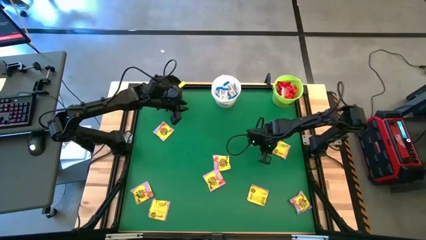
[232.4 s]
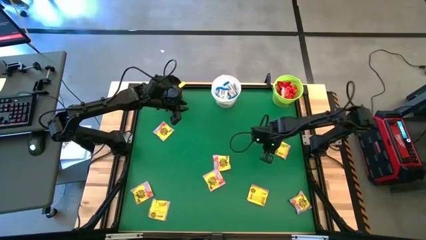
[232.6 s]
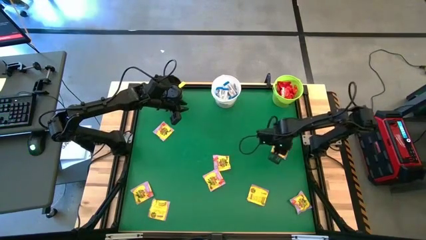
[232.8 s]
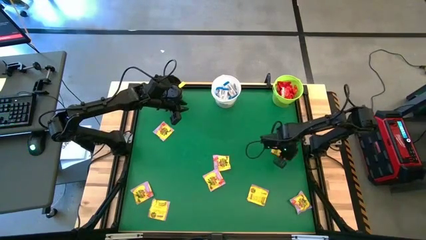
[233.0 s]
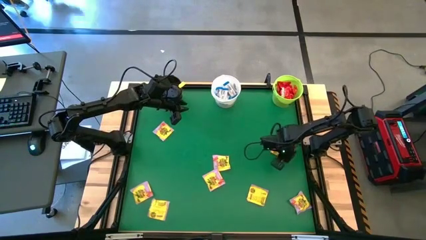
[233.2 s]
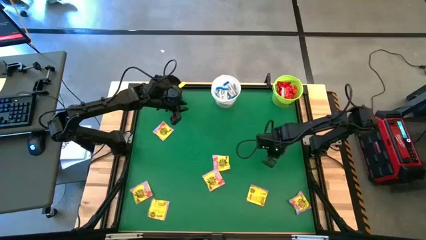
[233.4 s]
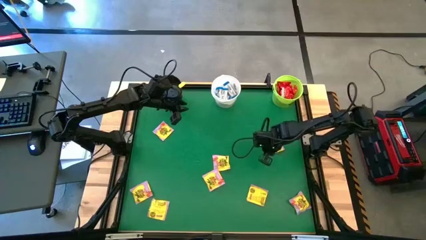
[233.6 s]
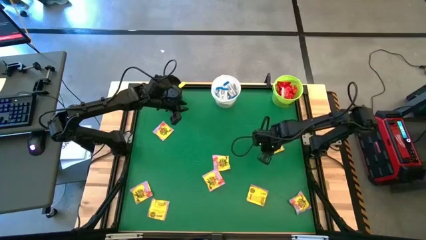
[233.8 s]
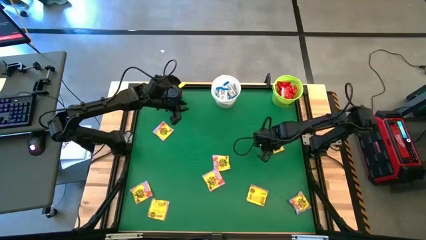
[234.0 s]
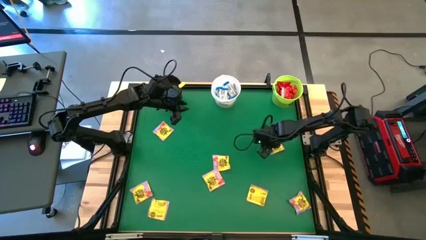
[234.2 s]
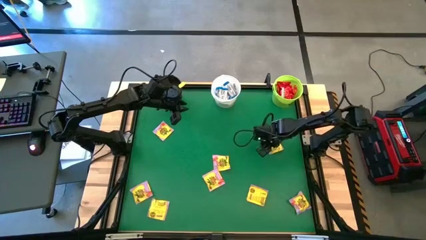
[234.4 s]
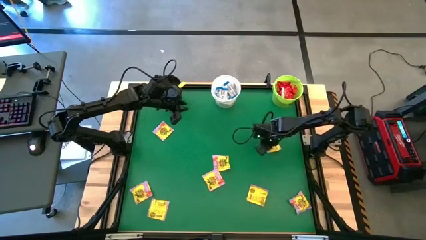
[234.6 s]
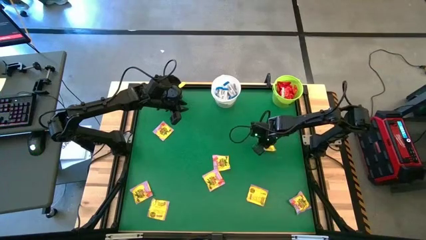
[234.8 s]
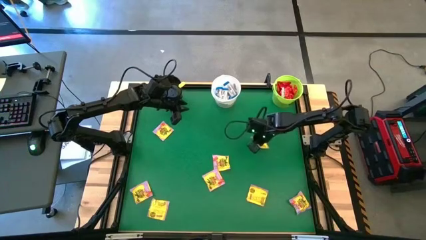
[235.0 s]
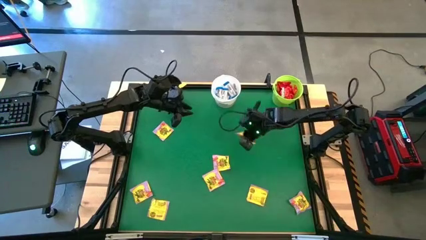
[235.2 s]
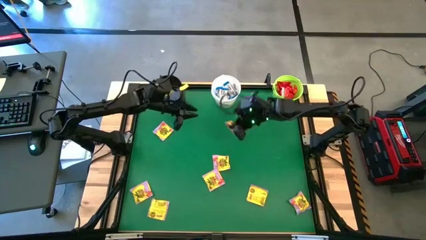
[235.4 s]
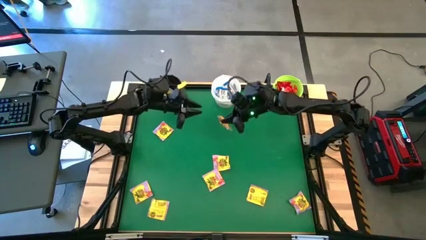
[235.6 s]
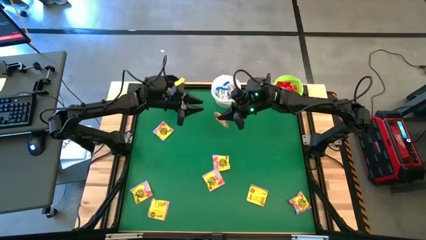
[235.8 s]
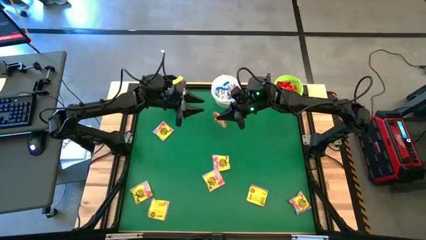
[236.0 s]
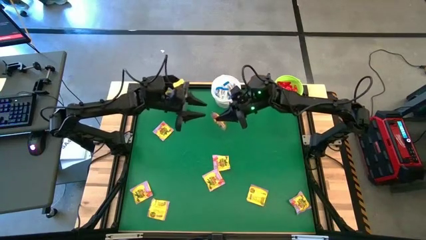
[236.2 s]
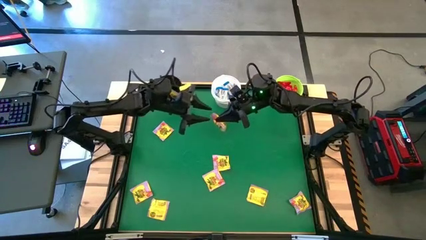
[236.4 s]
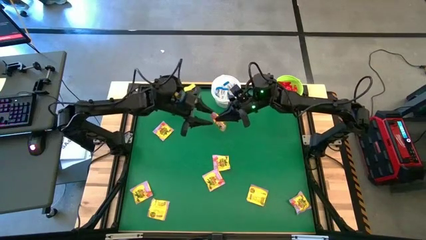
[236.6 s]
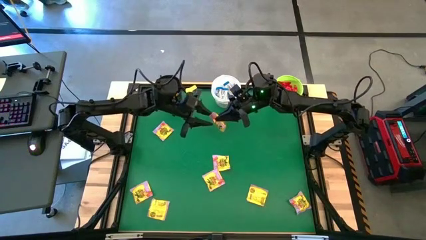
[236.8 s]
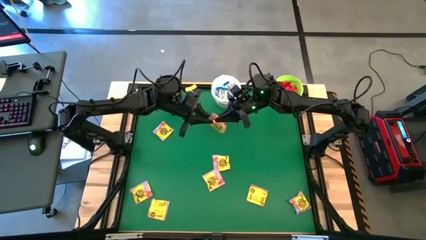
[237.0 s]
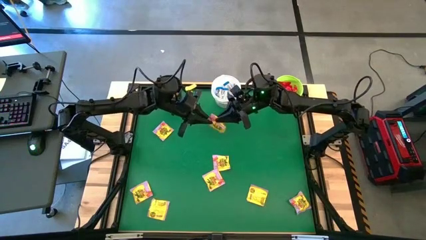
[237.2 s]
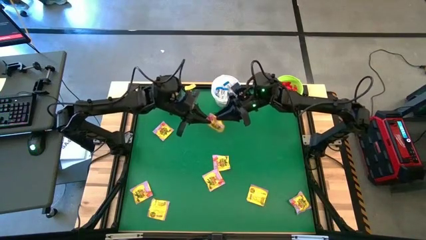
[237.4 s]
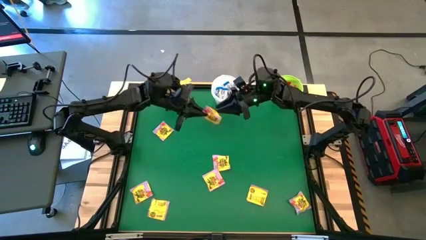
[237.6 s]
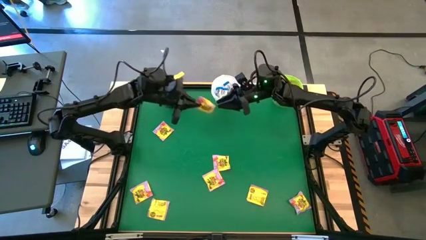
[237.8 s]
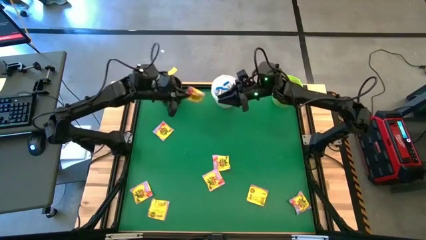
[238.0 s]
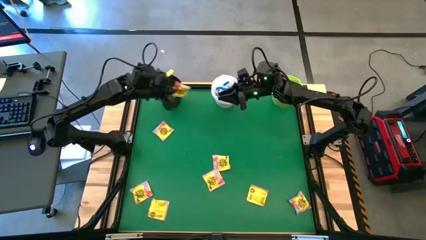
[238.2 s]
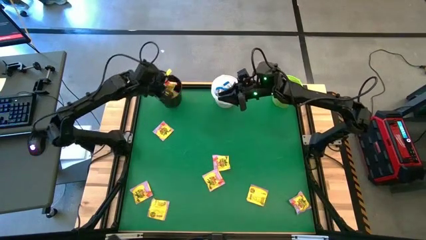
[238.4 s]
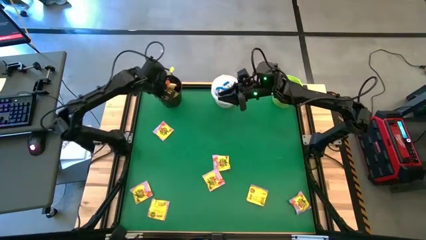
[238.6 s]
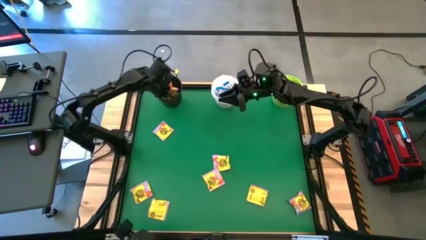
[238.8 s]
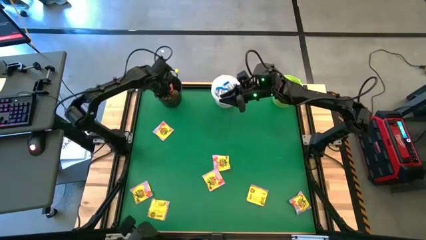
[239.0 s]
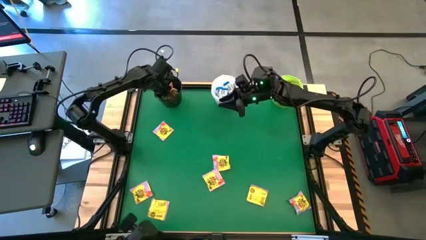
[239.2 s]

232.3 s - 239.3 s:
Task: Sort candy by brand, put in halloween buckets
Put the yellow candy into the black bucket

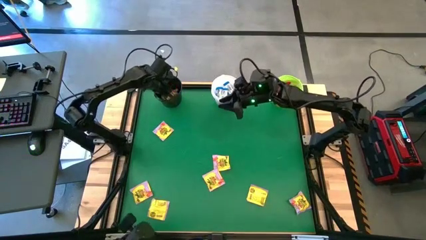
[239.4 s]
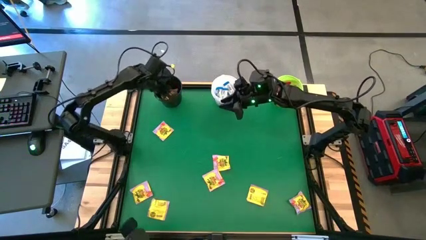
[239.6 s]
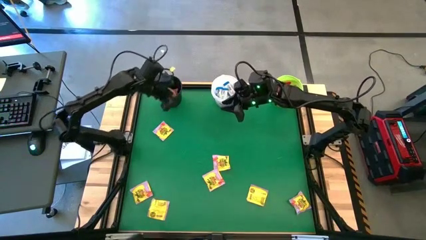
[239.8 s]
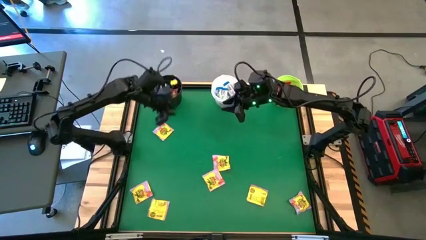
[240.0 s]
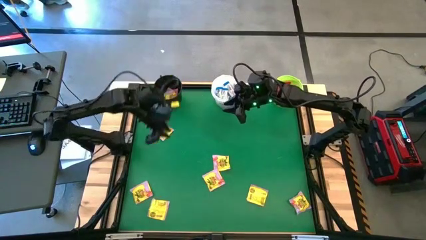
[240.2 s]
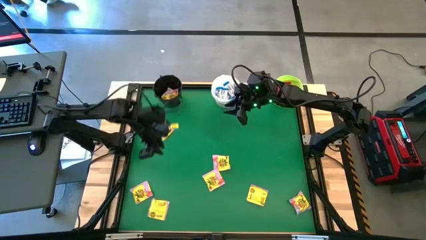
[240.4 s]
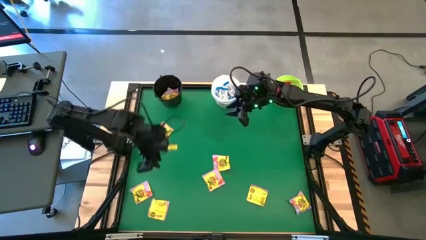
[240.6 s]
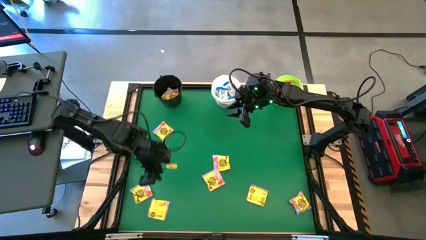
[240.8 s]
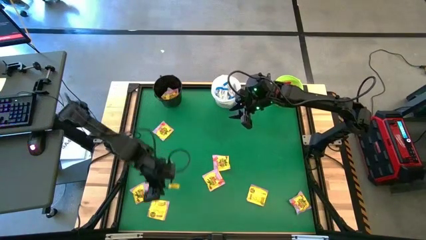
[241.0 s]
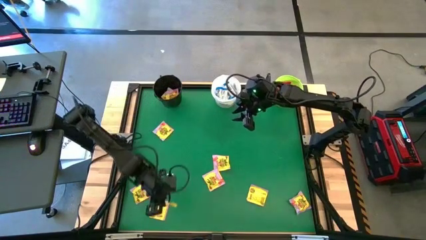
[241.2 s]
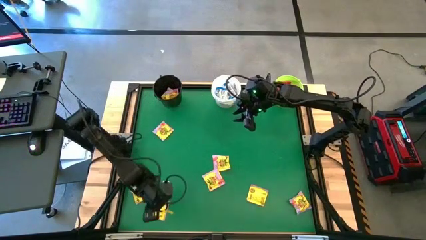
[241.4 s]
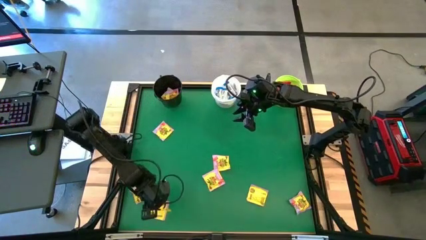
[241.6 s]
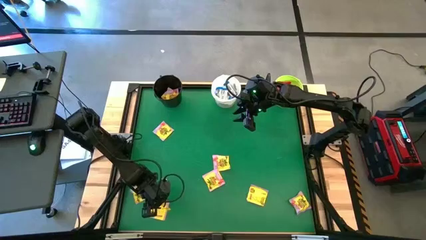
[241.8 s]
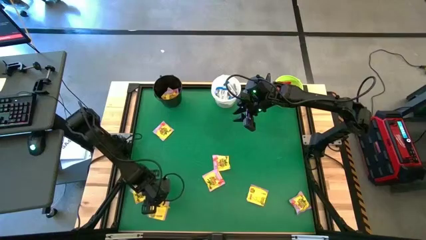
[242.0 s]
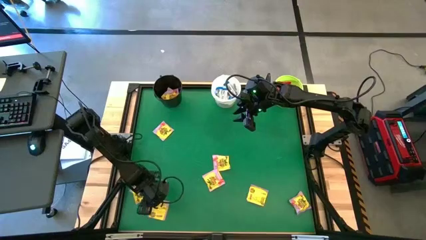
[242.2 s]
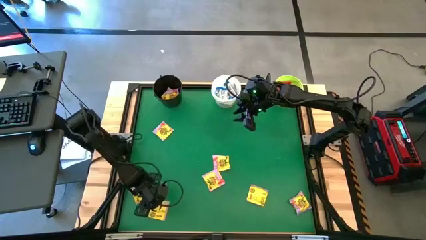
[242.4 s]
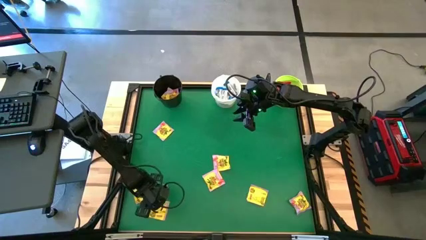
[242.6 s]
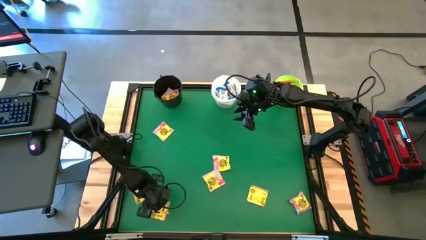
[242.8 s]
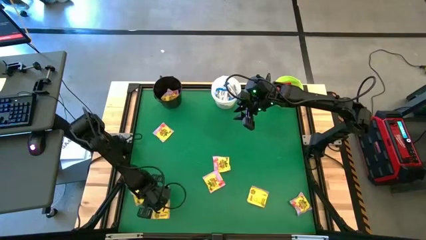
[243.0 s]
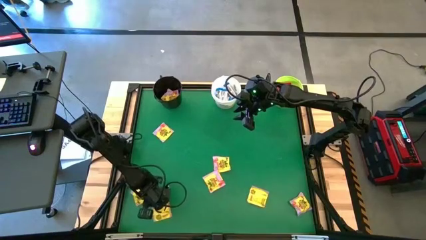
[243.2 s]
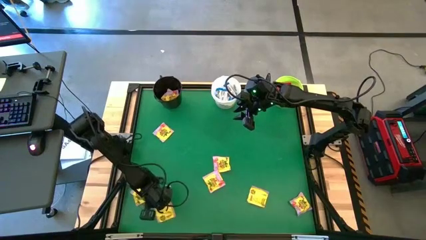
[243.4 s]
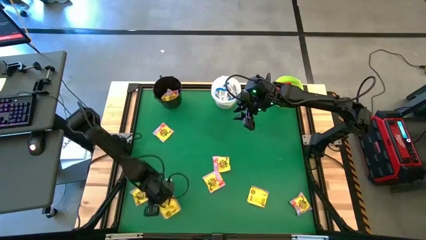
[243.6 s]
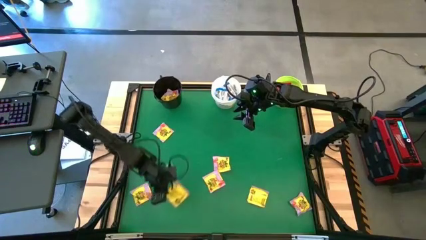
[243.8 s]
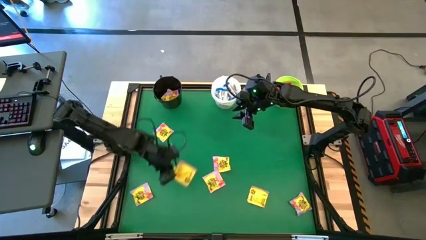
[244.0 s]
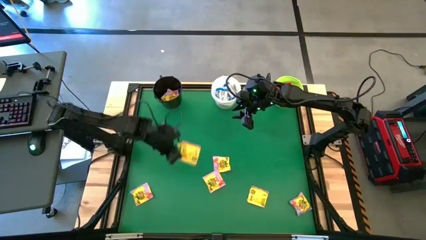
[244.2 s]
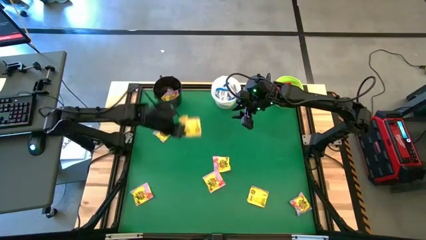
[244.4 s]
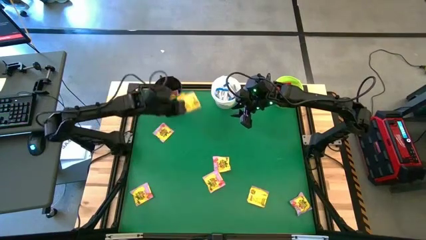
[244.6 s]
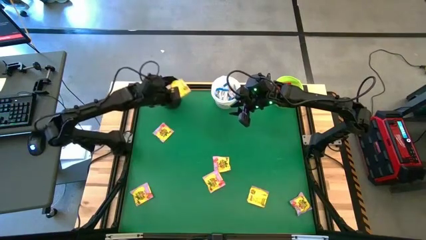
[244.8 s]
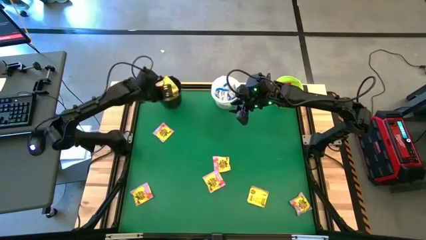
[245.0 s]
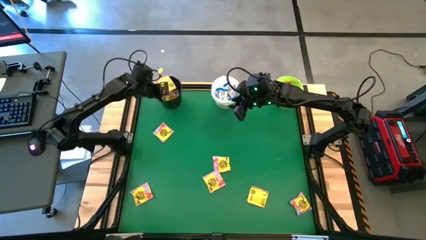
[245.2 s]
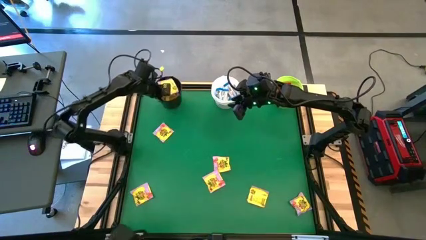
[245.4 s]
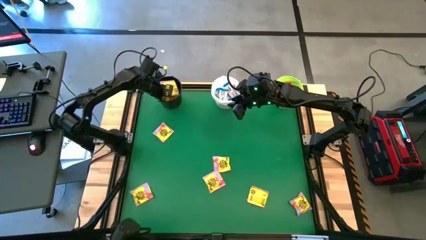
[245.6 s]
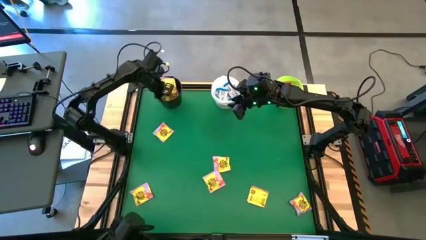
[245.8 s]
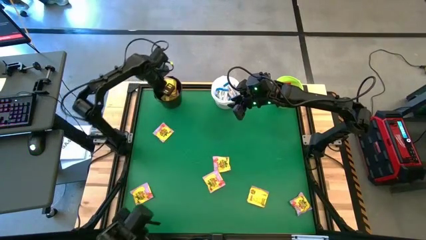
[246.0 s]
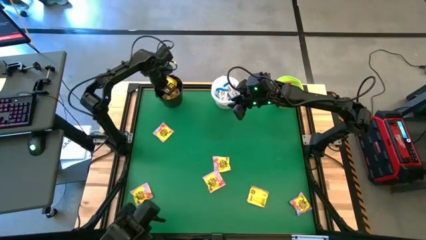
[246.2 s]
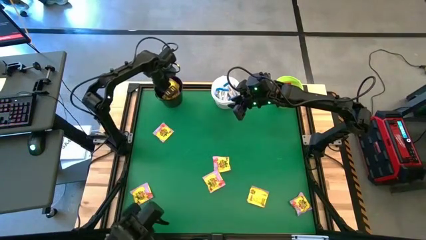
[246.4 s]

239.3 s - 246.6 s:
Put the yellow candy into the black bucket

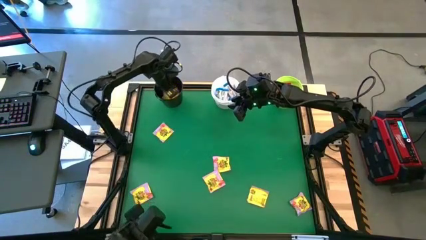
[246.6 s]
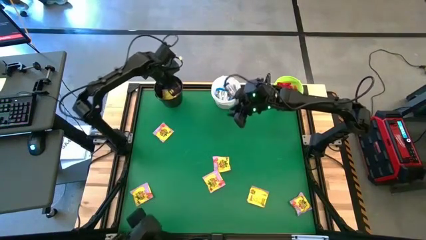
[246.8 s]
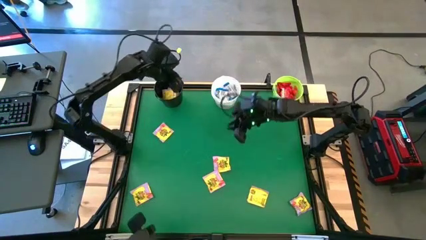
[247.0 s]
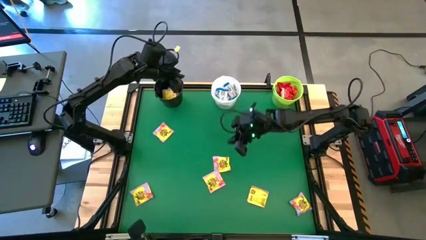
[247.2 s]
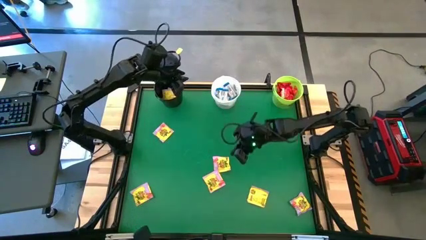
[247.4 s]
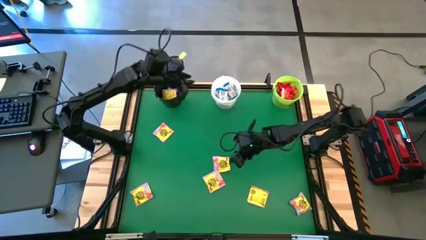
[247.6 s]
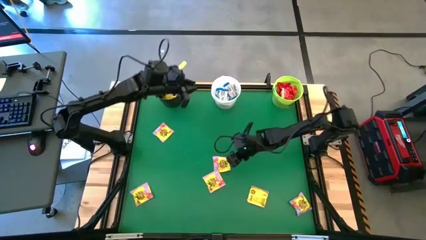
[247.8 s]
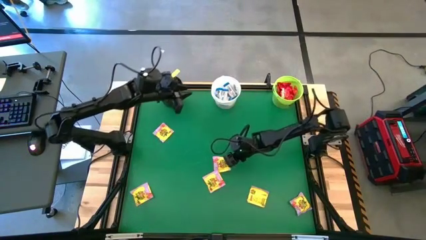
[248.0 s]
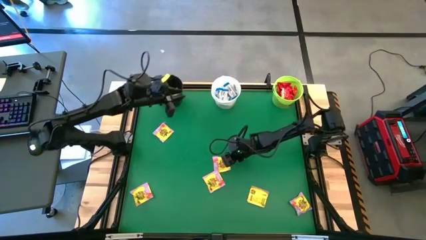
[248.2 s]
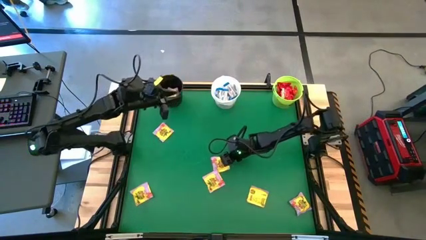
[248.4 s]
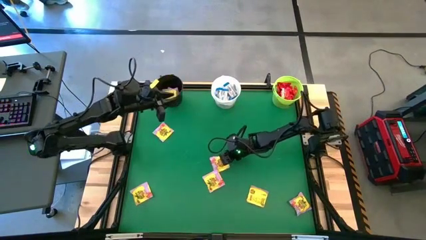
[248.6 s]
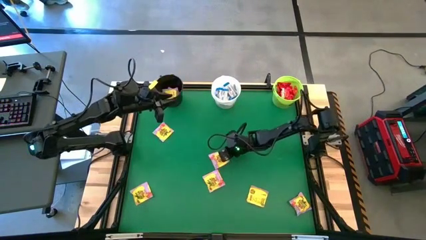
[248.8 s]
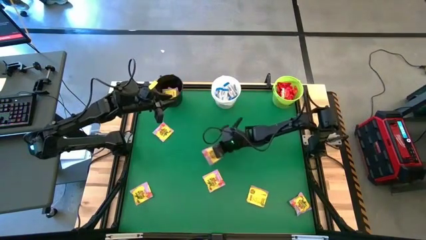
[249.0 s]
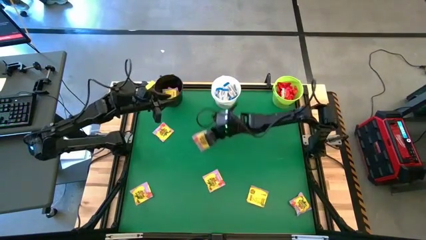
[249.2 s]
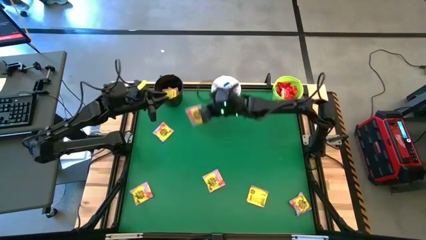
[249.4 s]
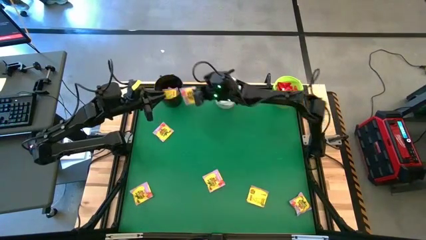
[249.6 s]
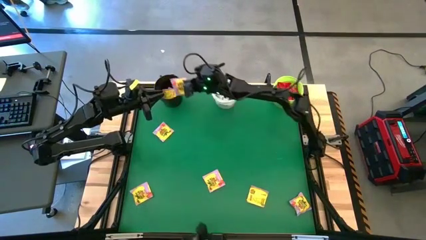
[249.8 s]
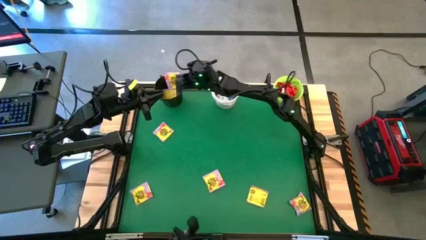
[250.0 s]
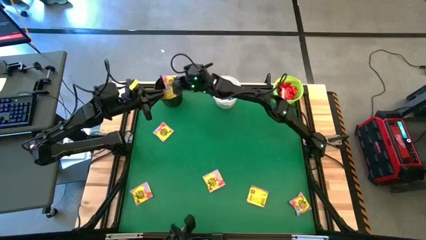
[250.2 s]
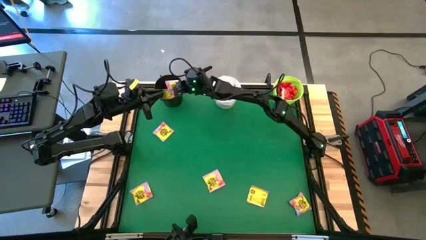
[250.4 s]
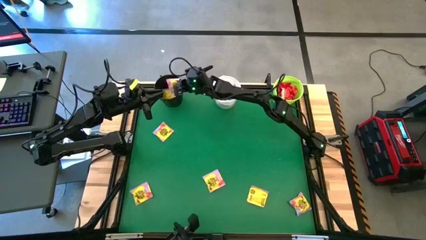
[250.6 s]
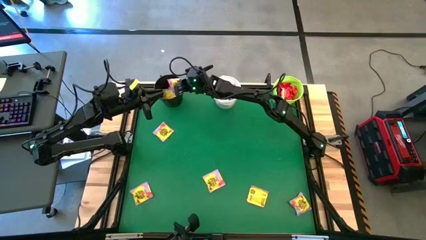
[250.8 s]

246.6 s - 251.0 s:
Put the yellow candy into the black bucket
